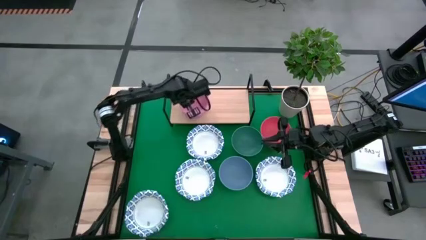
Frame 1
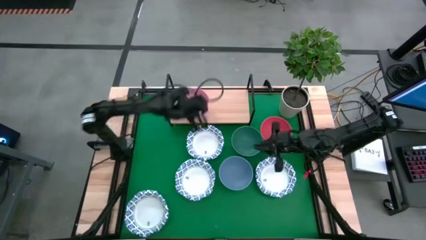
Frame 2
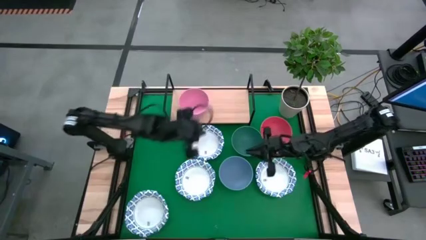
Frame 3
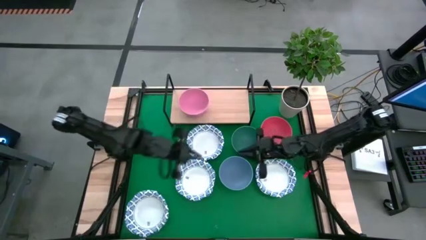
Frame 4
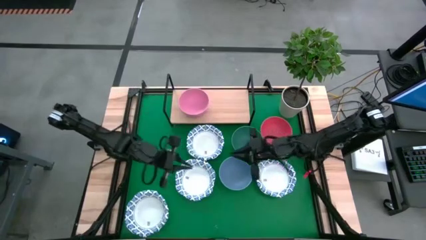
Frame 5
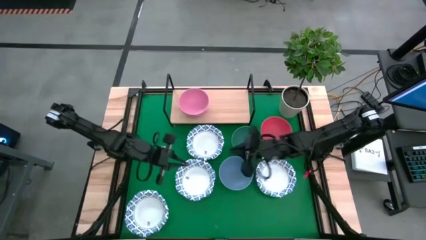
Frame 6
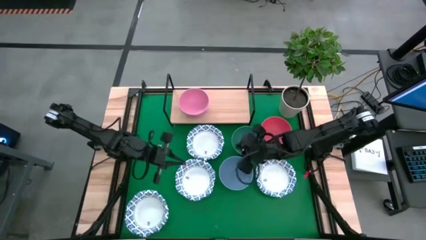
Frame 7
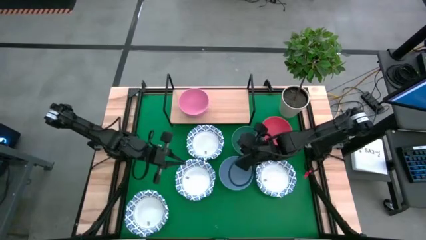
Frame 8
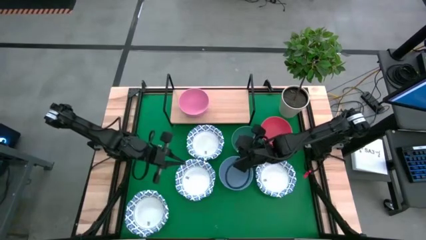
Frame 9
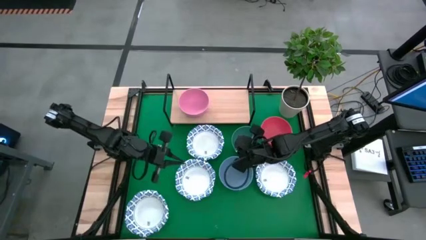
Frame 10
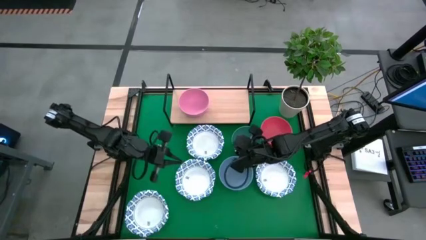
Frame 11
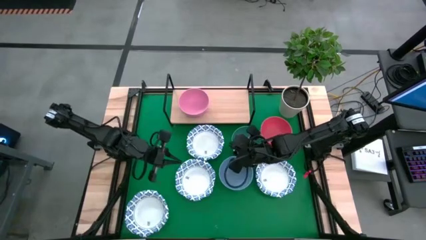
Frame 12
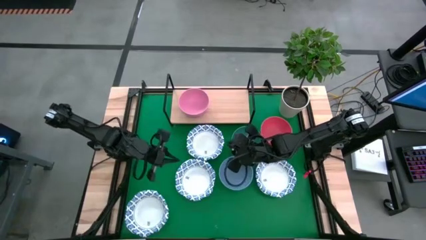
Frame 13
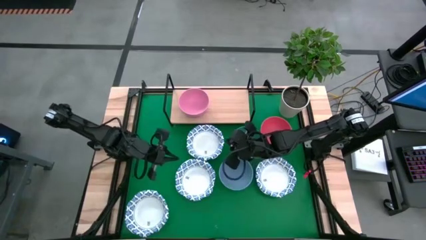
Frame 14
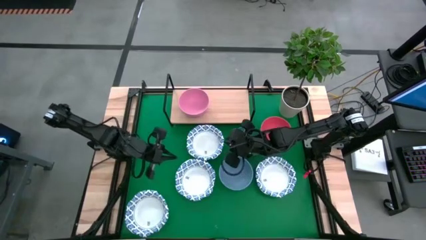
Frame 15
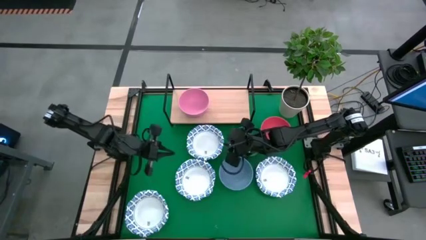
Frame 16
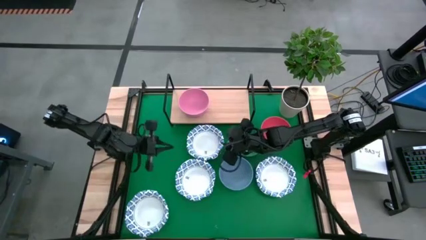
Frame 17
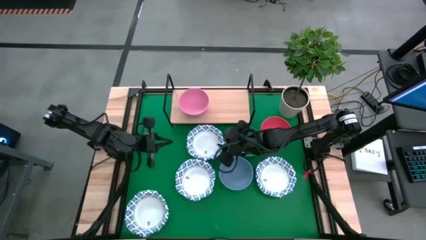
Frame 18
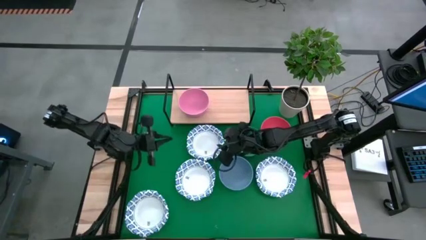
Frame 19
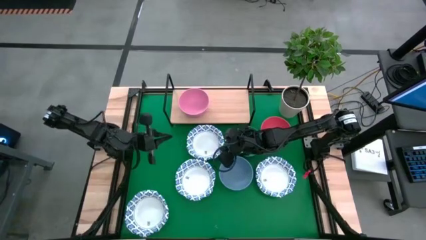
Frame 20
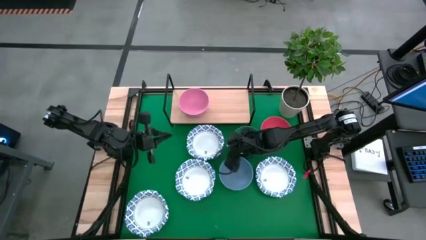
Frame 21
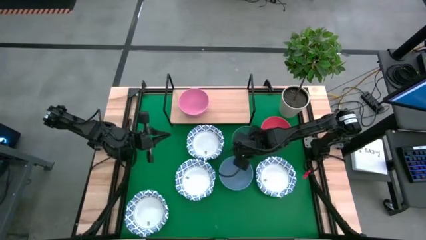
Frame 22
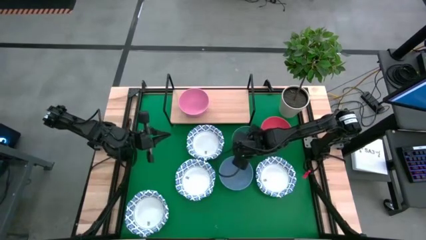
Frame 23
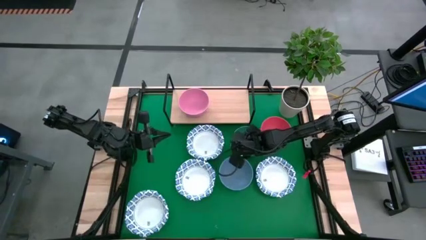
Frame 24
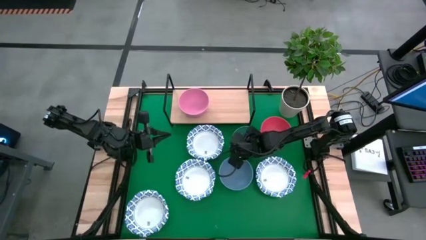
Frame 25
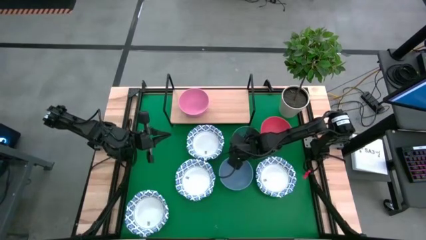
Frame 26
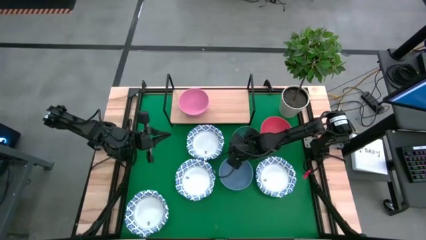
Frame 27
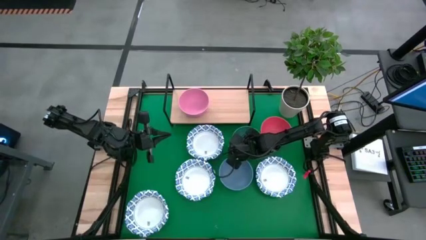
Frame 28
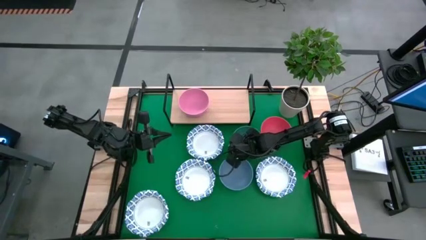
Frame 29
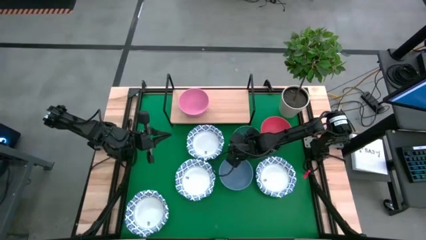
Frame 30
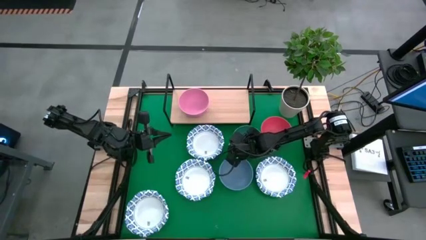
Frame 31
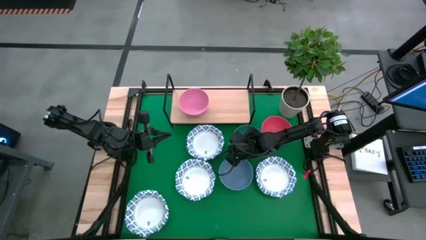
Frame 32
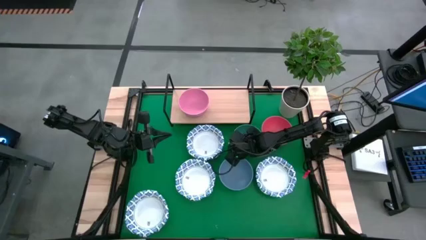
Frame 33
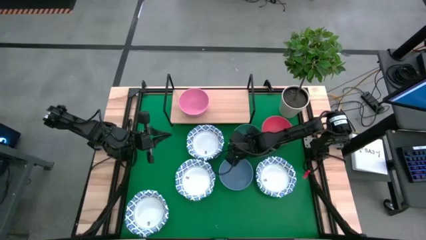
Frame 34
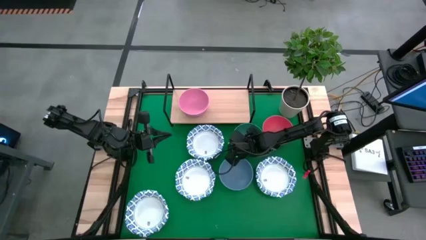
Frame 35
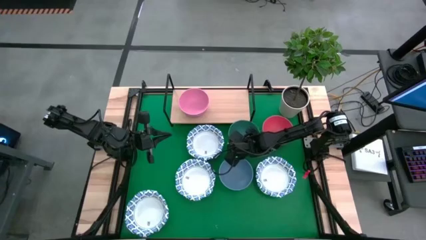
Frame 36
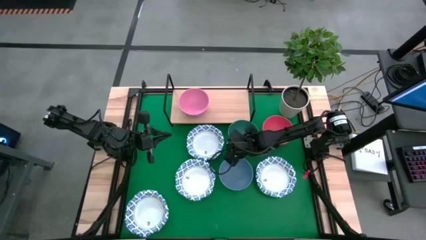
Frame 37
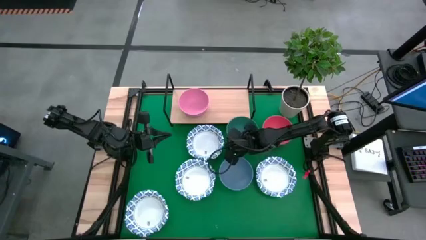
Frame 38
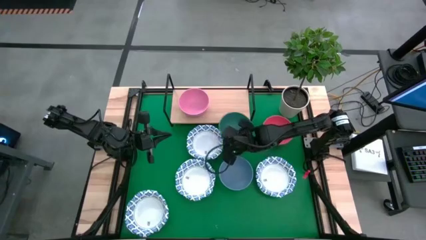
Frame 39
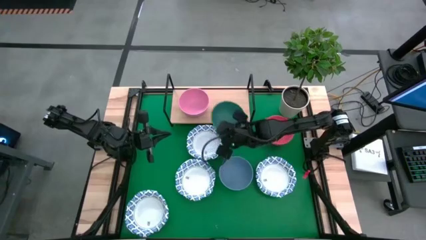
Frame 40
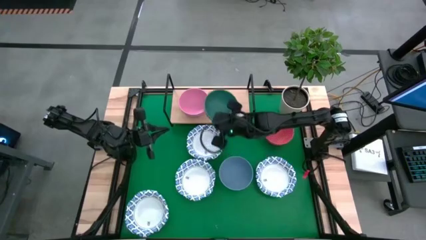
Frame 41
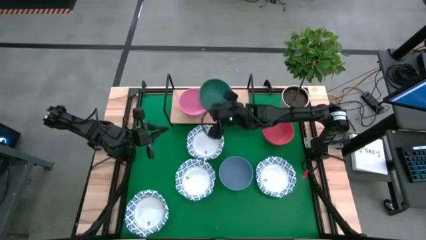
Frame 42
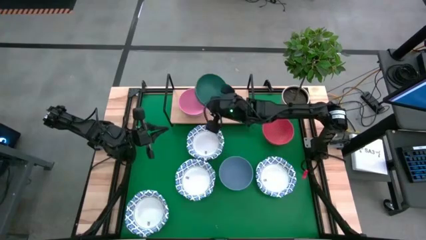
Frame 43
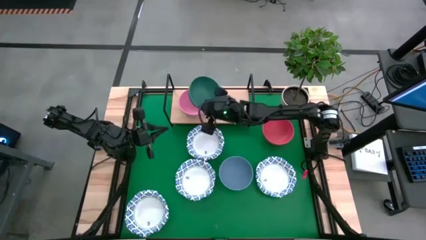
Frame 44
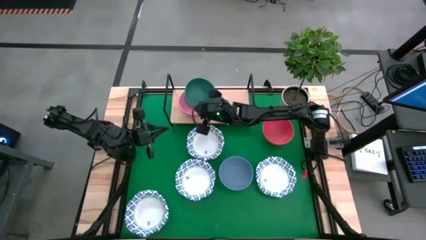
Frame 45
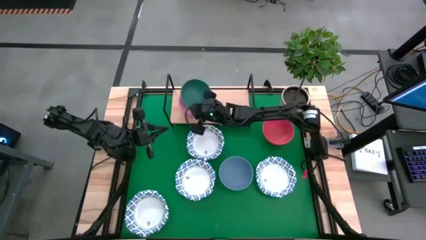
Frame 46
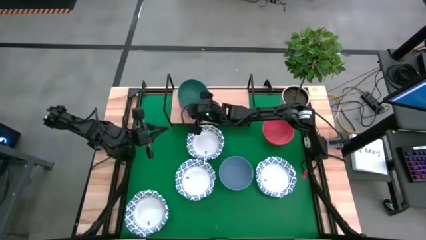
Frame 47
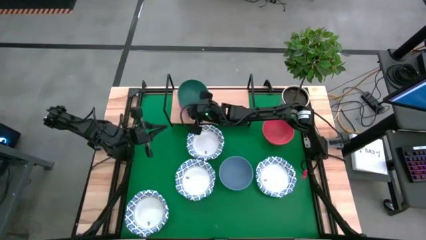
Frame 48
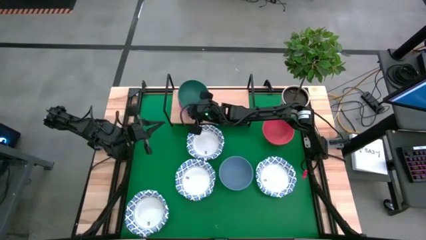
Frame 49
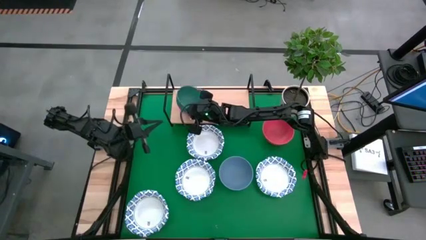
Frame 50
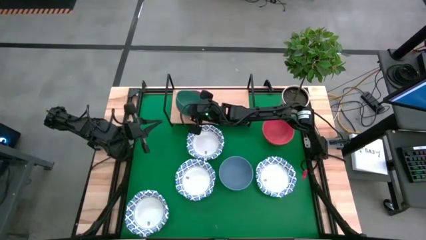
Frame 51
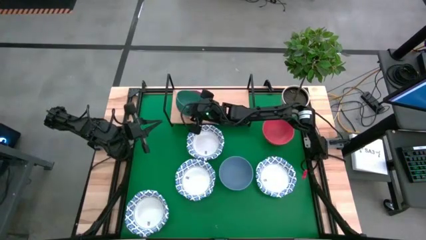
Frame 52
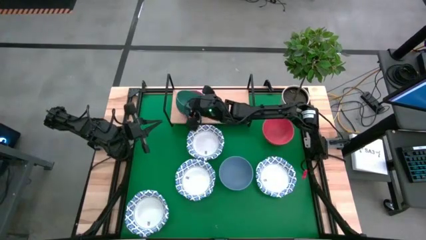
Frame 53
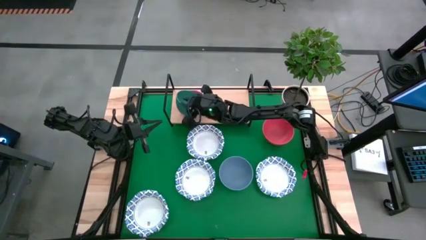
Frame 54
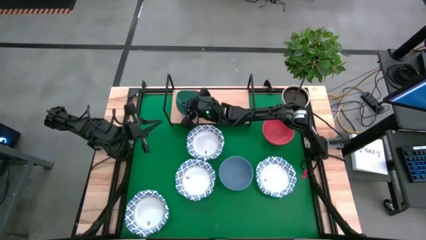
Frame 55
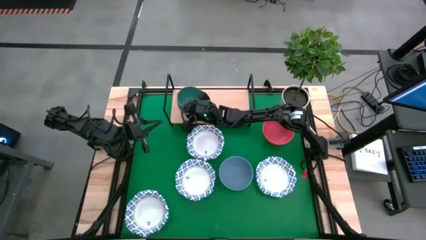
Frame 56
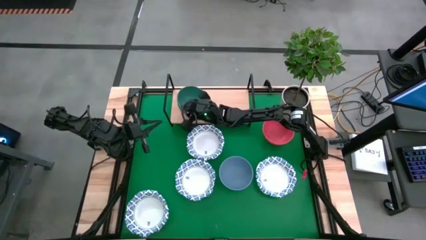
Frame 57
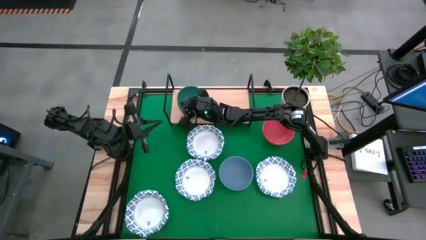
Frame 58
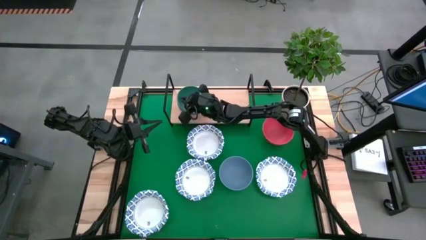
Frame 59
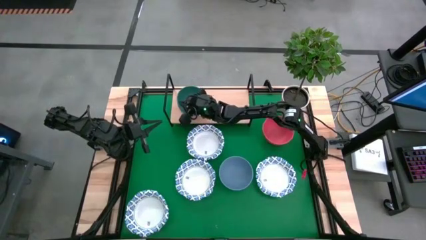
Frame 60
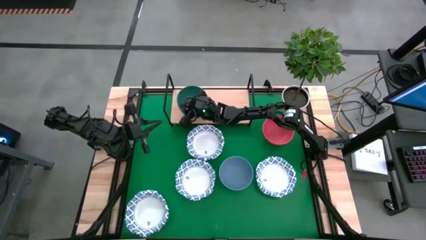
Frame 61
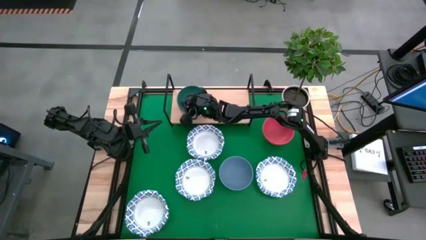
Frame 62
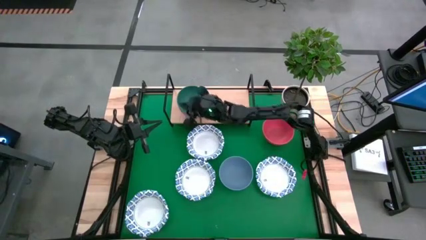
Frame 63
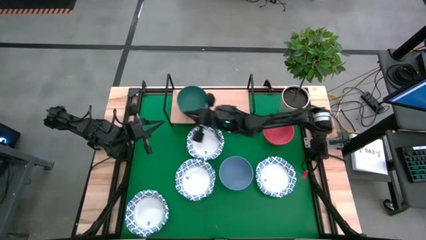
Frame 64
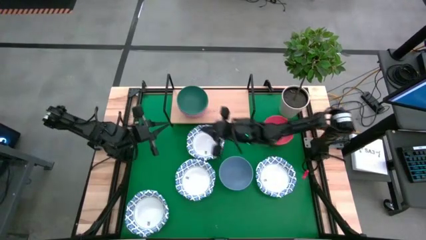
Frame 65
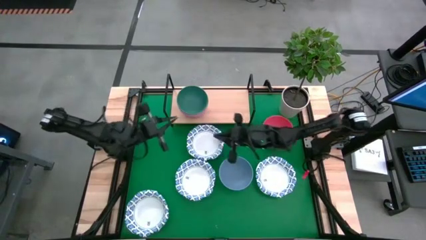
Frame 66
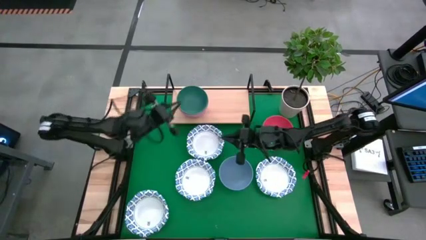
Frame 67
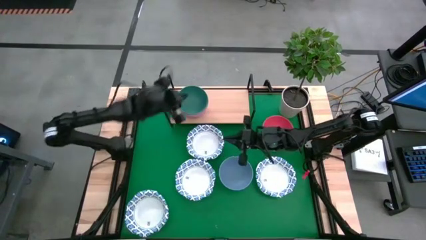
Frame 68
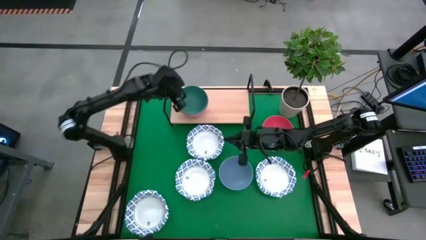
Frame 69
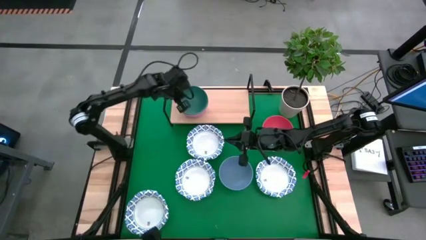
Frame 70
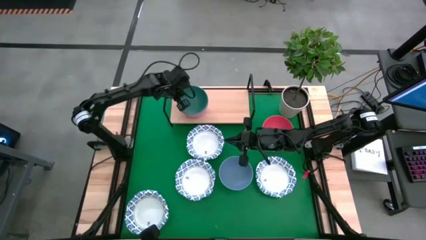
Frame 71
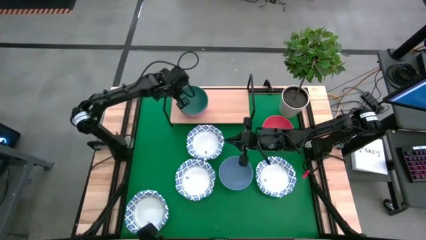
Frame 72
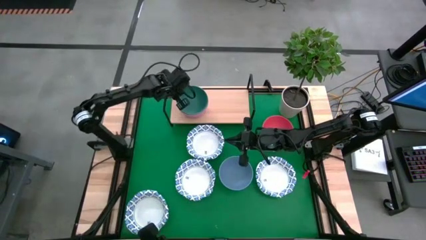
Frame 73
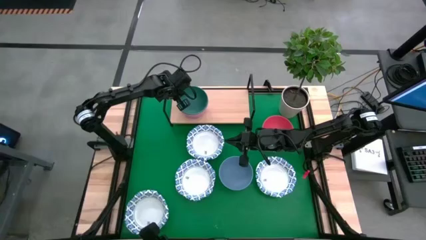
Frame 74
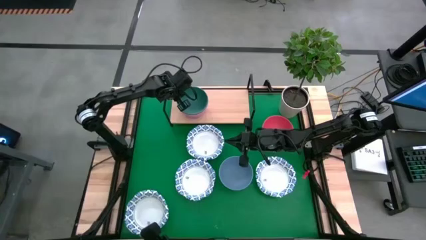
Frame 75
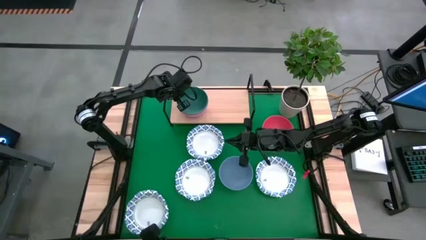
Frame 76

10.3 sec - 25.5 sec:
Task: Place and stack bowls onto a shelf
Stack the green bowl on top of the pink bowl on the shelf
